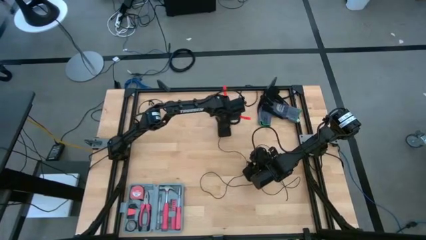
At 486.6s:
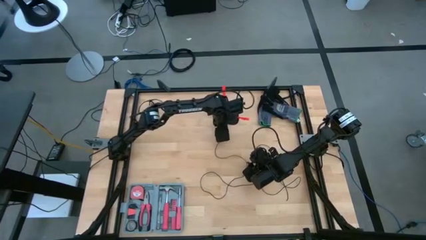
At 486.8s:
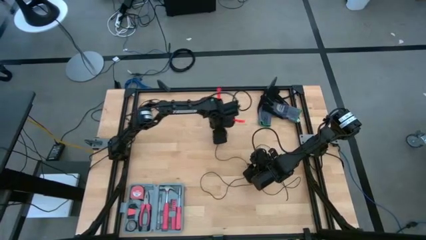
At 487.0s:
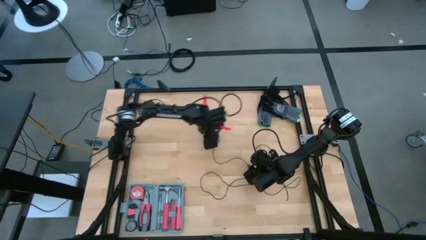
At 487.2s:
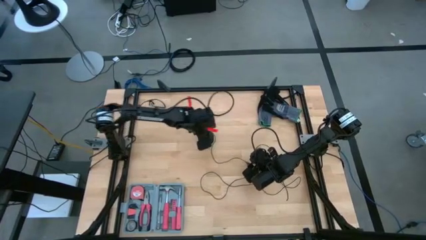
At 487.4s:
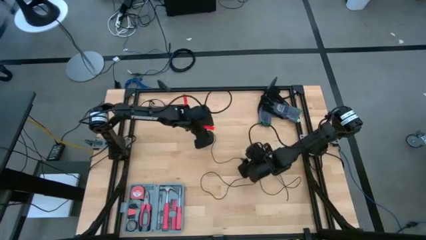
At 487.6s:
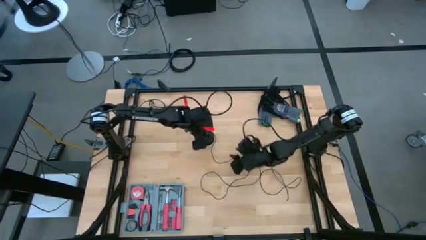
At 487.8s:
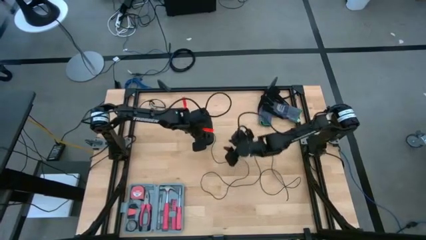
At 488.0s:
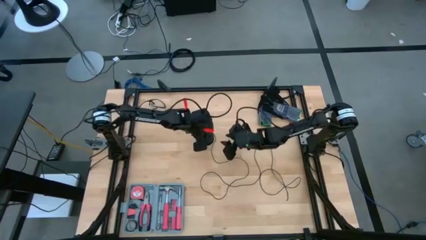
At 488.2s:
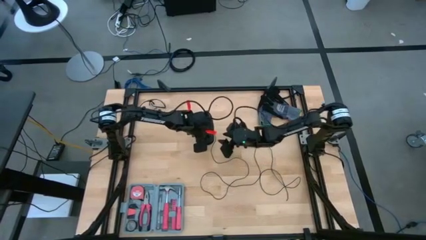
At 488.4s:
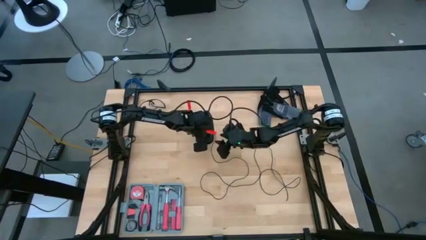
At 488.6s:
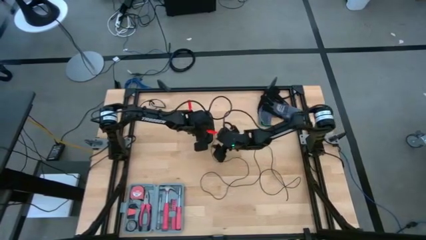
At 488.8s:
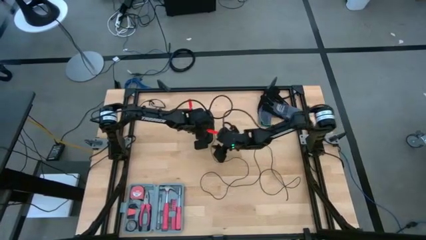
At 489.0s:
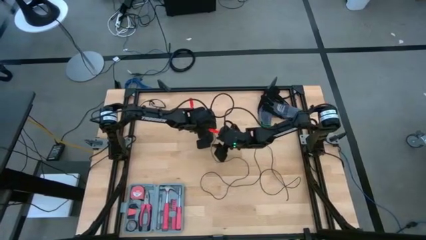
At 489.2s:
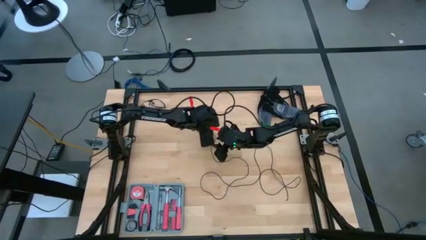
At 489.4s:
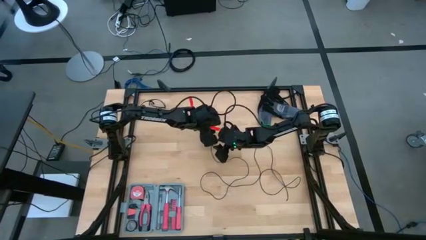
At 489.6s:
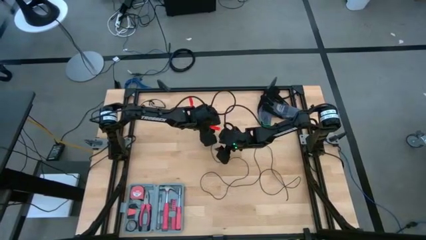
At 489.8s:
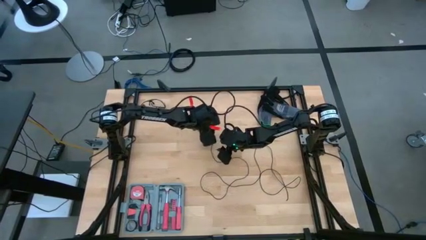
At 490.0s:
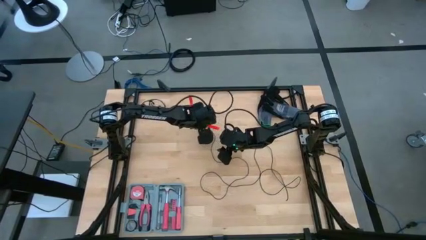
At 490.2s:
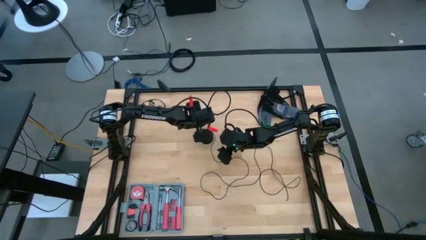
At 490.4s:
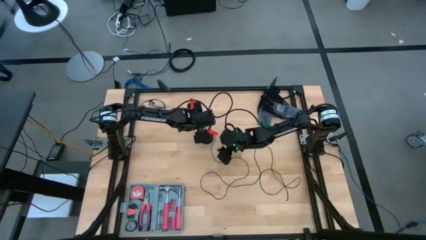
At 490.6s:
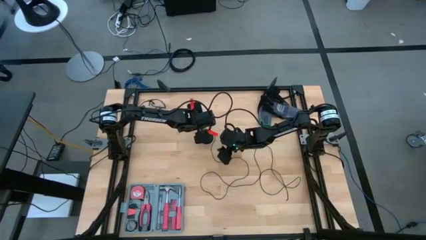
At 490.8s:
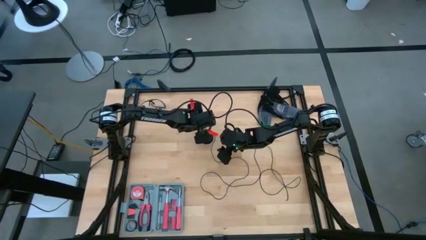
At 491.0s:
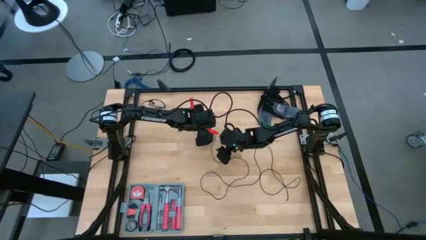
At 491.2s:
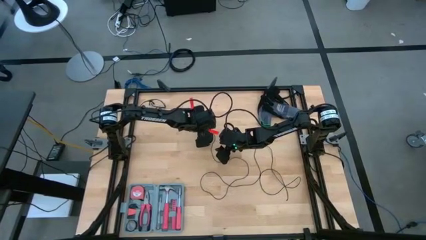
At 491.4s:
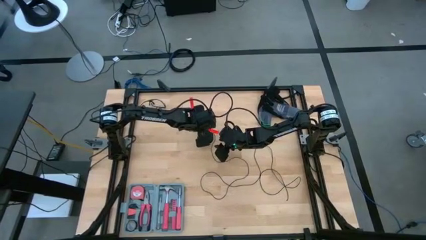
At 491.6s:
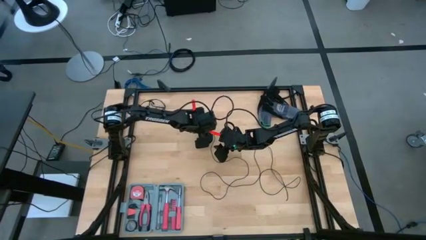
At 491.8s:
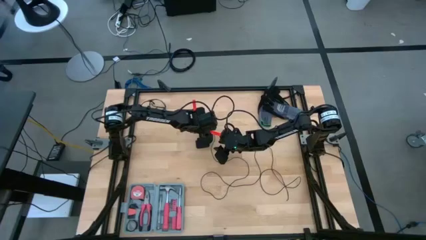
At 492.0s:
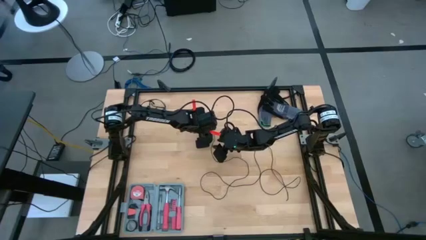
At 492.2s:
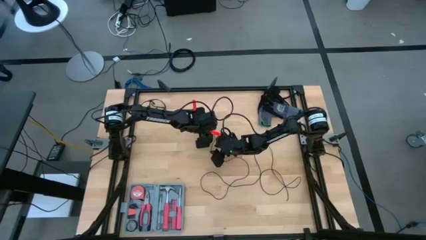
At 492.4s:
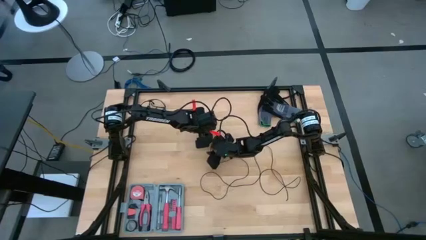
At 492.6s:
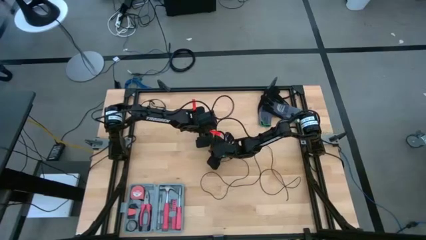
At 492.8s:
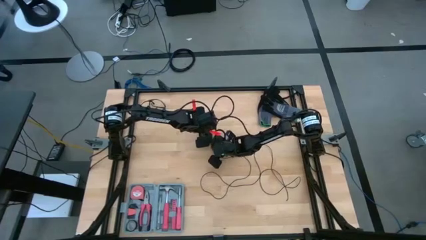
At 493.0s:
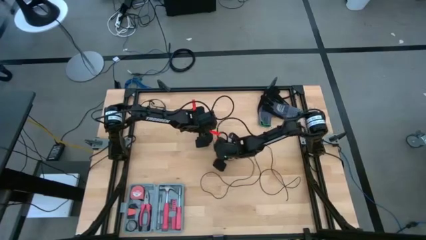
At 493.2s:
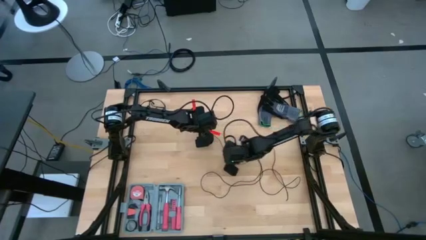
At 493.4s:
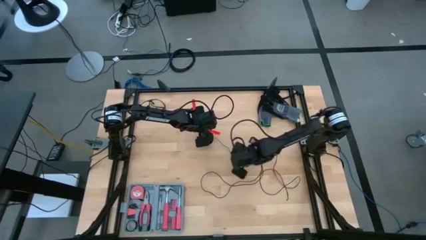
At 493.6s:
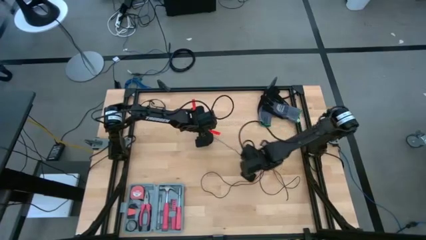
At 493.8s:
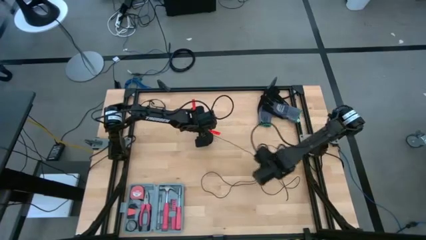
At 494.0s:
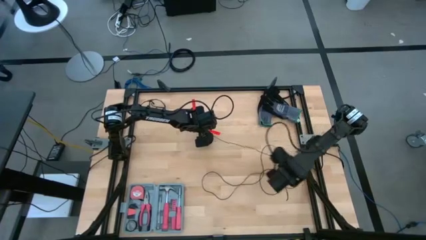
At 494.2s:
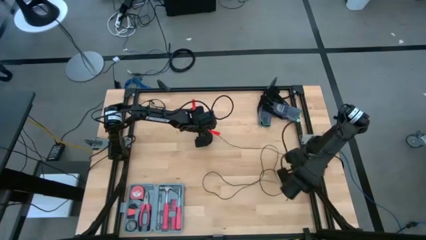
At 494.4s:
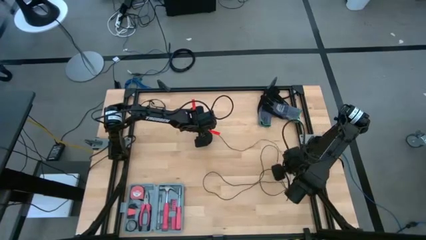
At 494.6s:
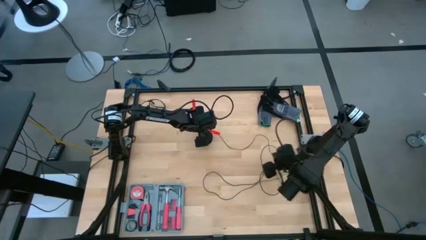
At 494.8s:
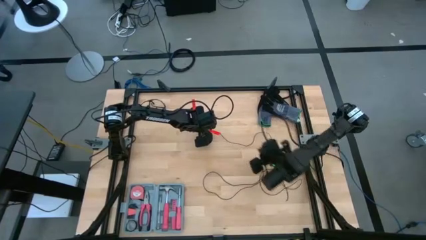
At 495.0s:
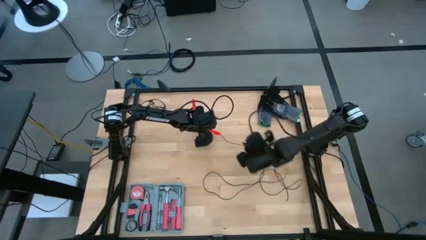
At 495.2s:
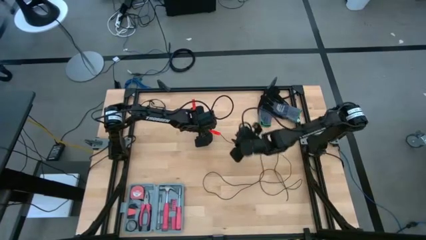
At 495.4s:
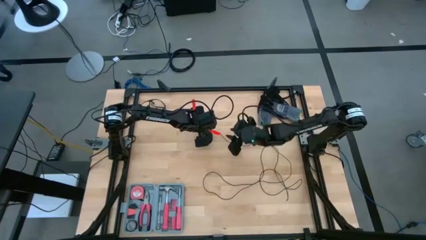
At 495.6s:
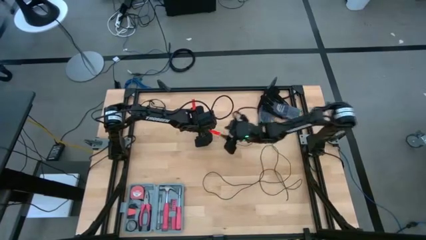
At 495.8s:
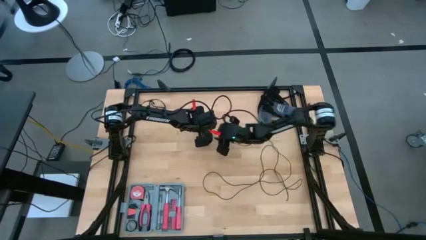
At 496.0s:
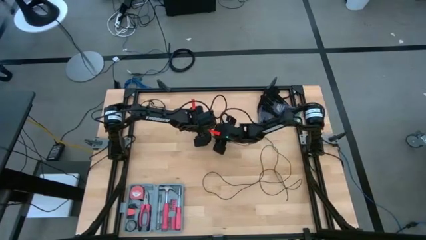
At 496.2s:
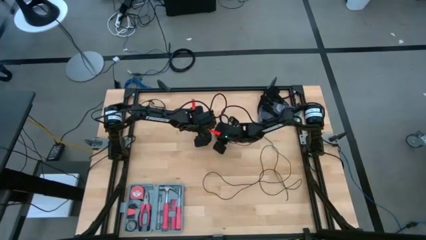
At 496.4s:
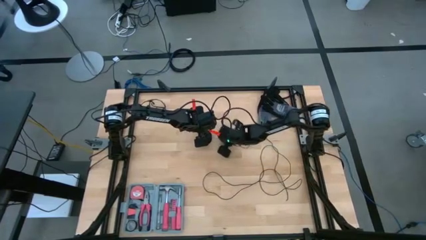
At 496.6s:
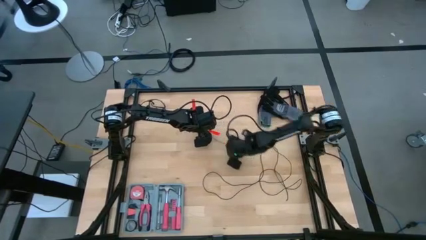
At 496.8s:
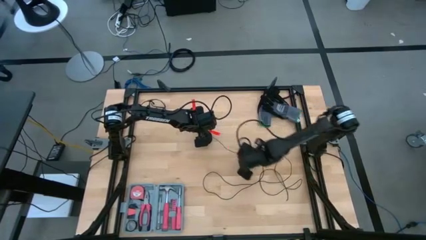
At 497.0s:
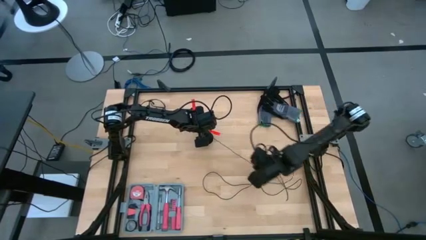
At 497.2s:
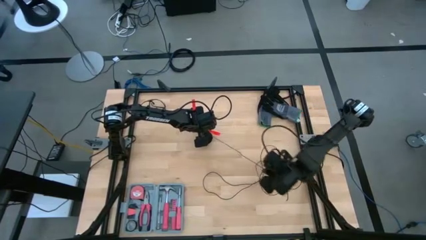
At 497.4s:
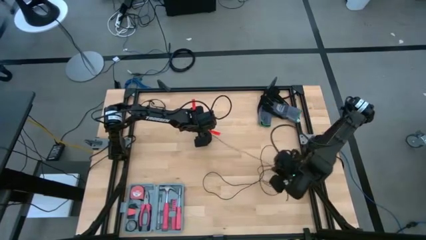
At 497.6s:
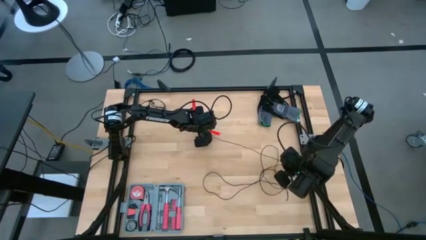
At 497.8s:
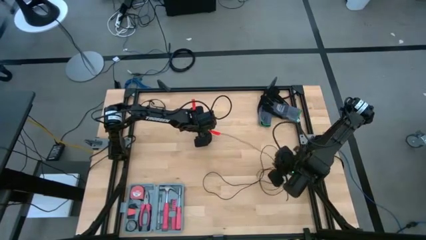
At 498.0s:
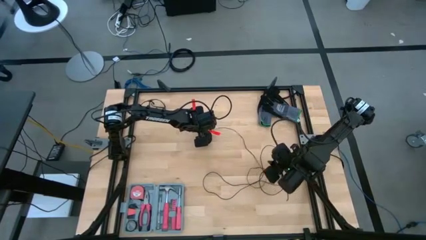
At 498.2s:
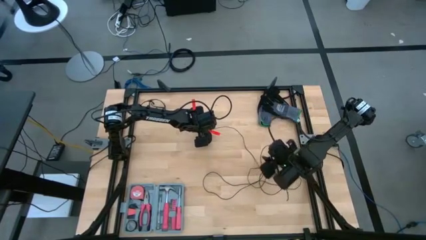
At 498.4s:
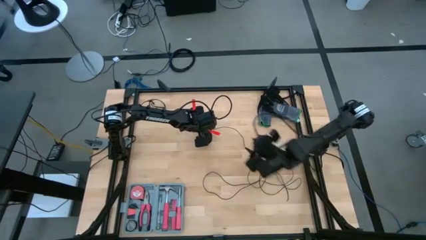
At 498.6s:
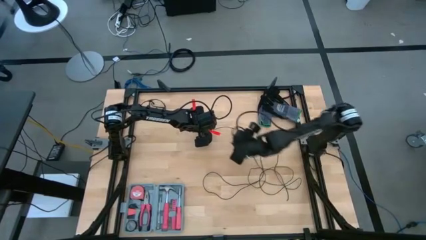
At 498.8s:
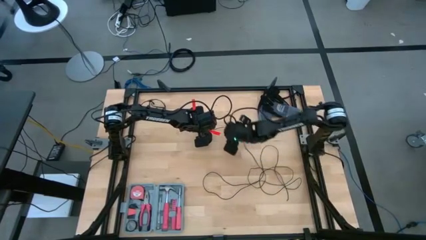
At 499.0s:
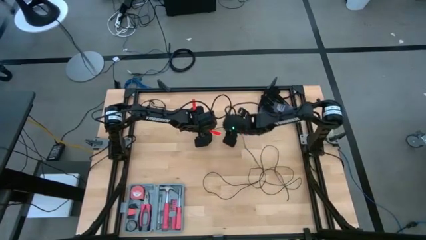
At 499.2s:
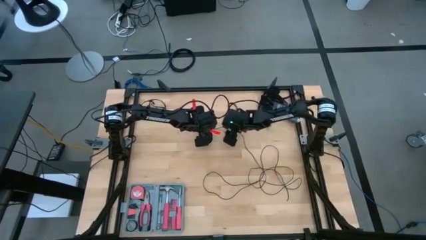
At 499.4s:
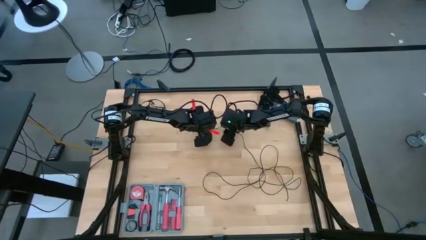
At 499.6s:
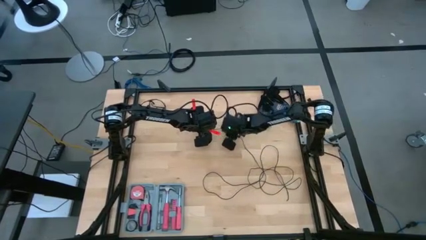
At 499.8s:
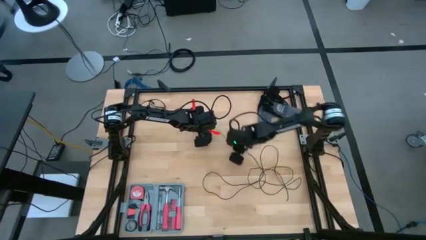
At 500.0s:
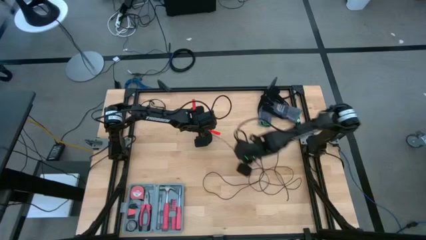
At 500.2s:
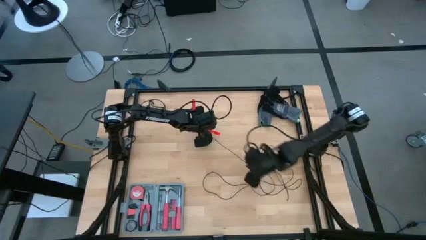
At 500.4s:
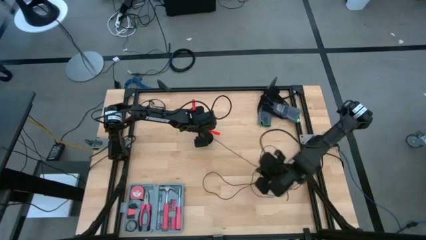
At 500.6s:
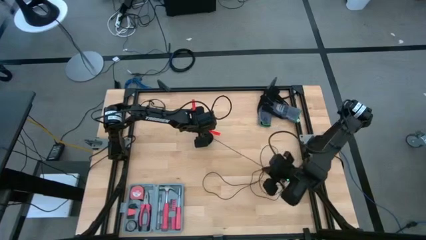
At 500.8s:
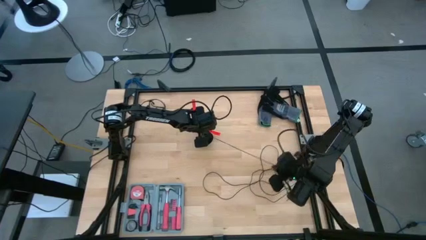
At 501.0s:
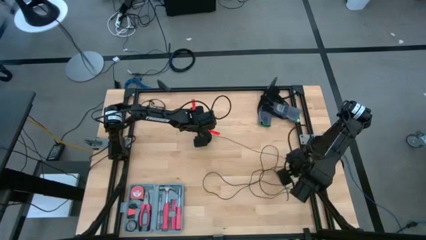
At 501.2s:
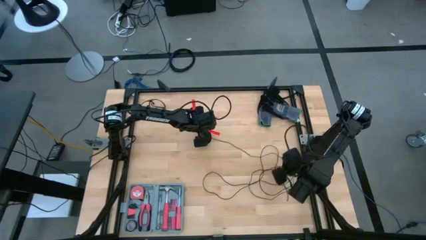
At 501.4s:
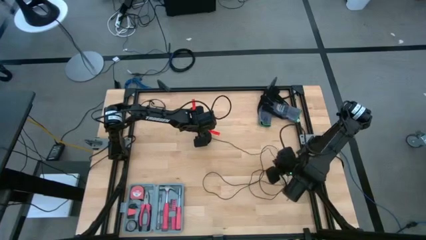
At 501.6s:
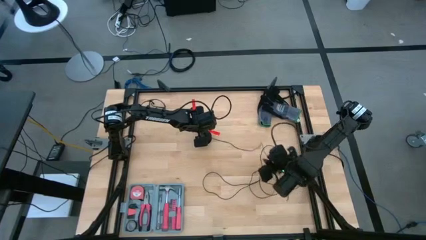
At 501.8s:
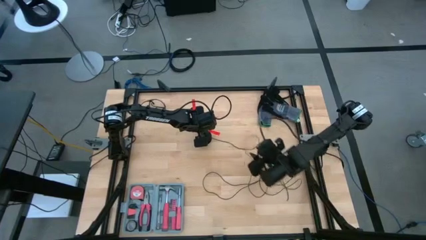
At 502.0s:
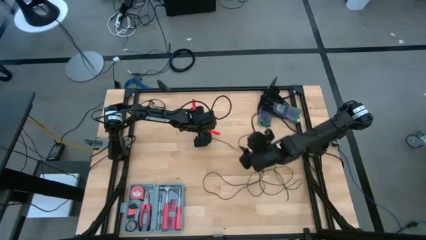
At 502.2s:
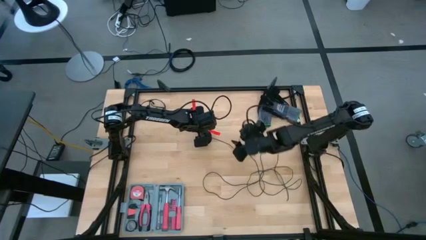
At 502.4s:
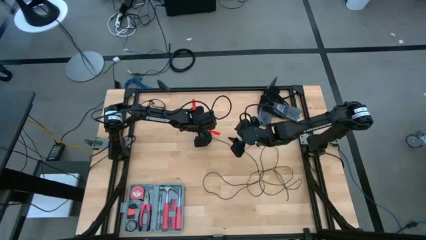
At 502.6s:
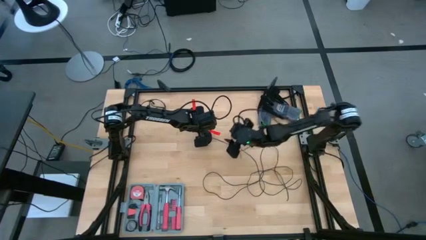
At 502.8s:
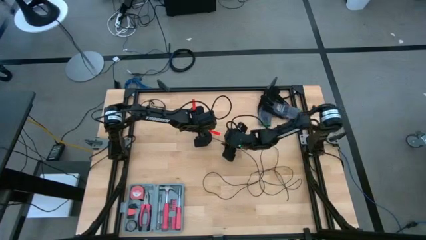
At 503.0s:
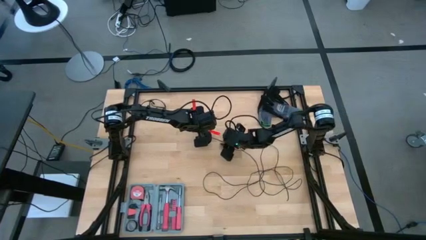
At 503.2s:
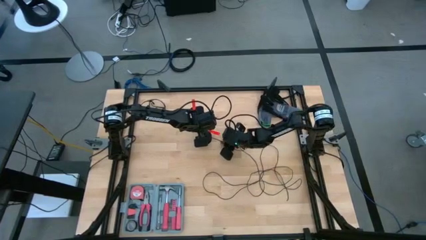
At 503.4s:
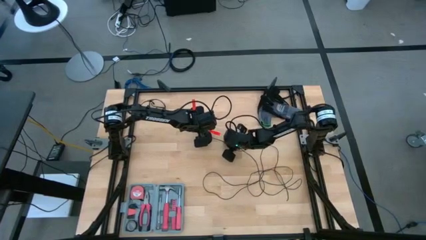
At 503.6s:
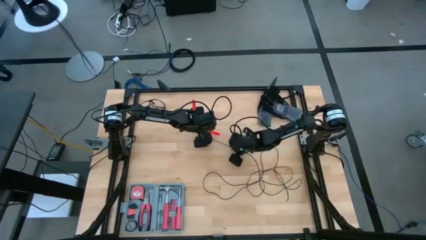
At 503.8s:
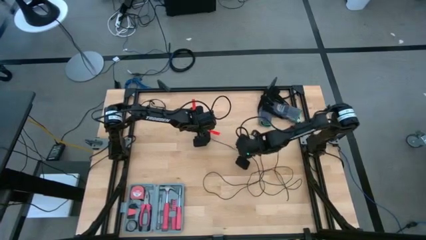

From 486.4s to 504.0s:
Task: Coil cords
Uncoil the black wire from the black spool
